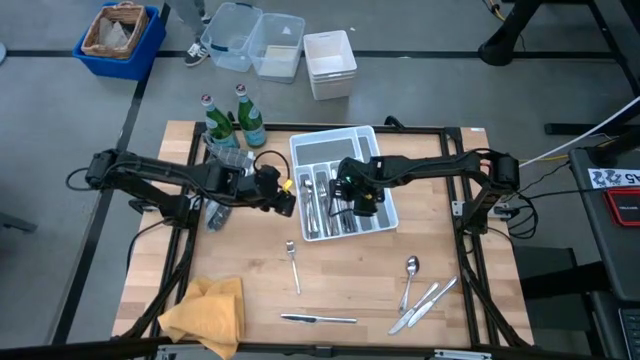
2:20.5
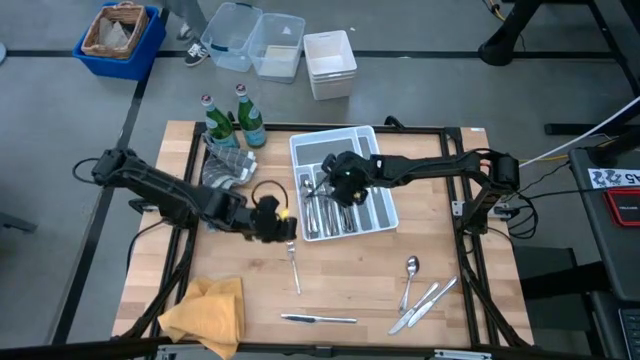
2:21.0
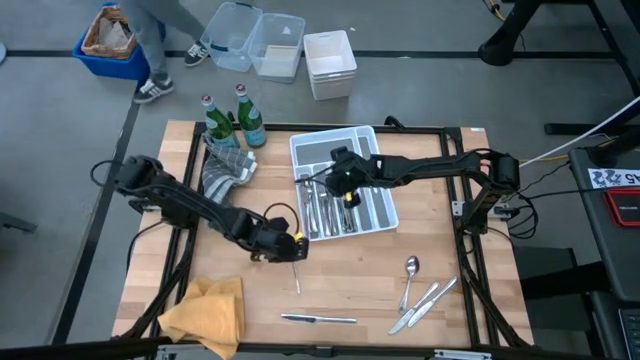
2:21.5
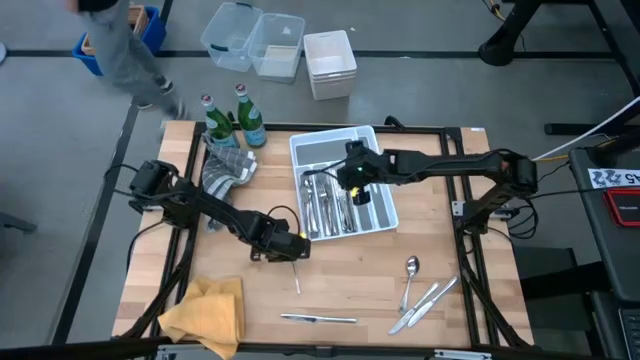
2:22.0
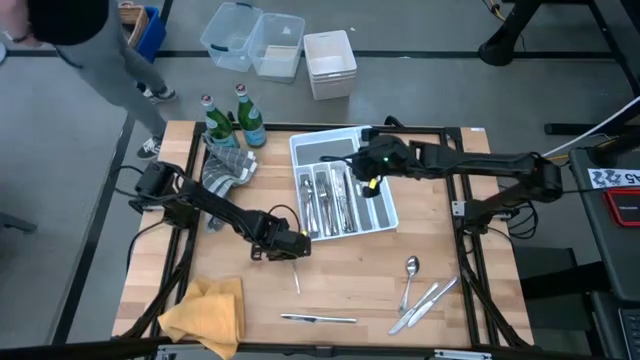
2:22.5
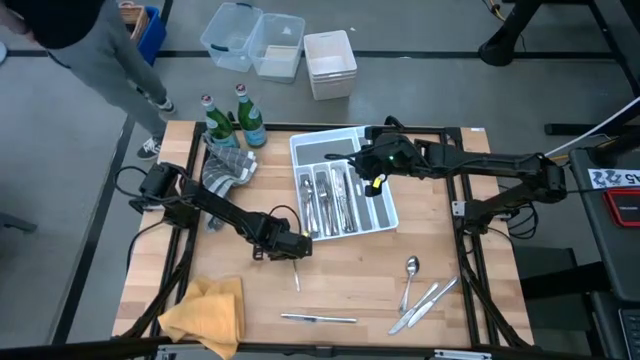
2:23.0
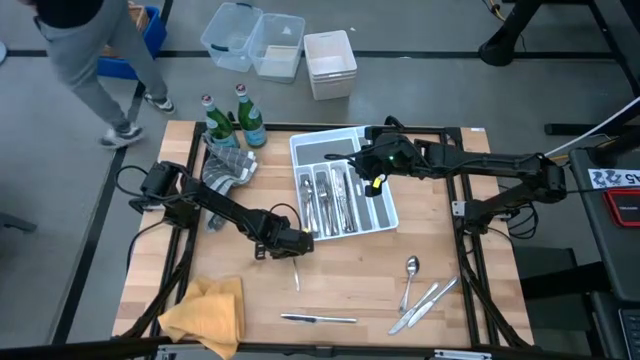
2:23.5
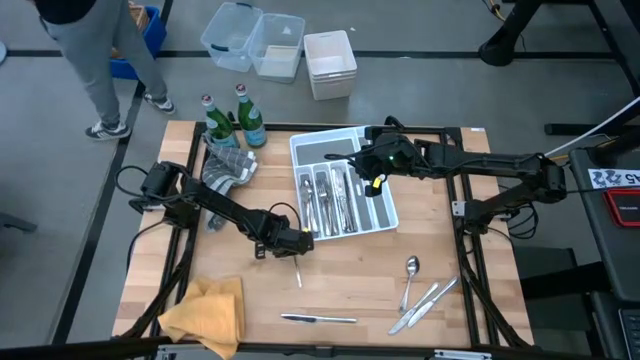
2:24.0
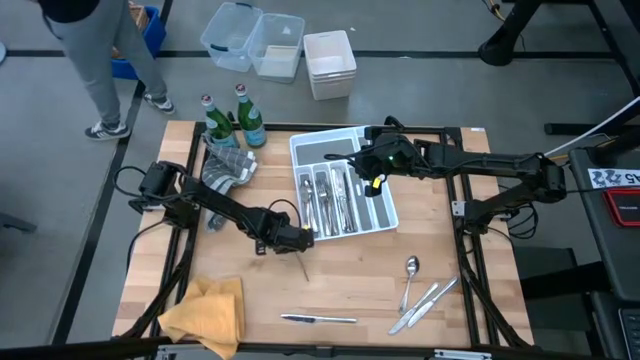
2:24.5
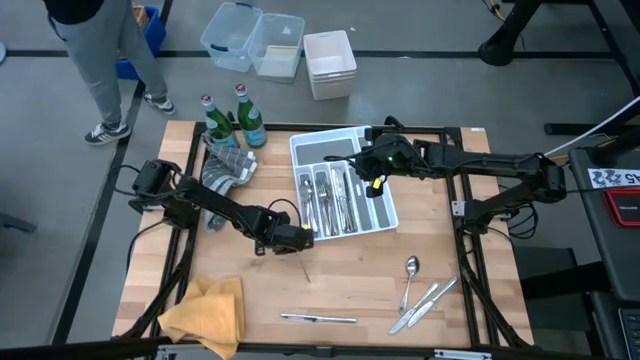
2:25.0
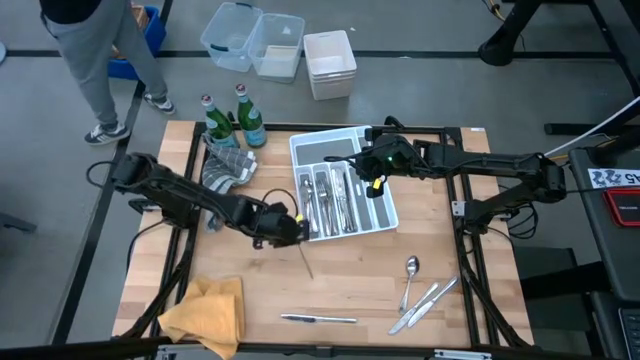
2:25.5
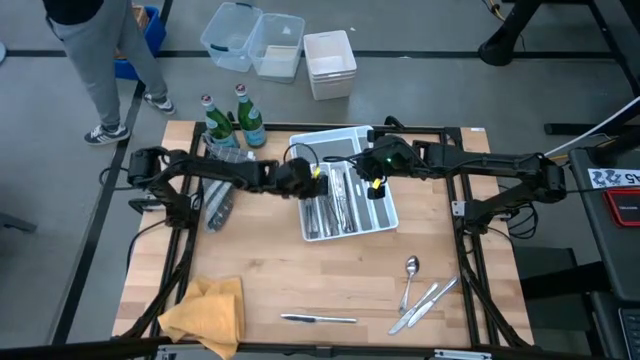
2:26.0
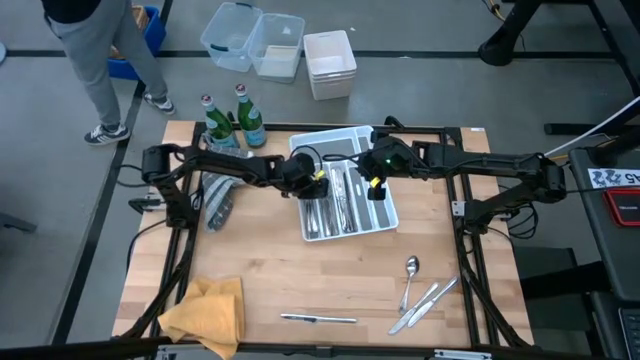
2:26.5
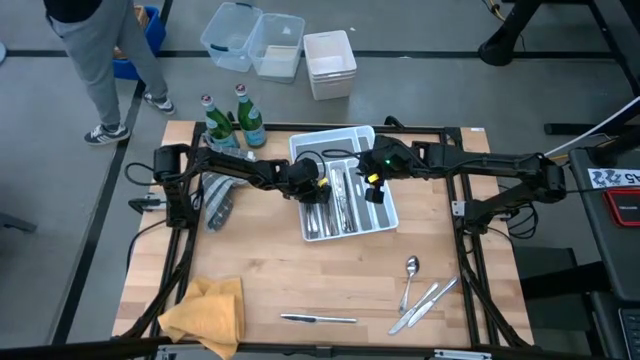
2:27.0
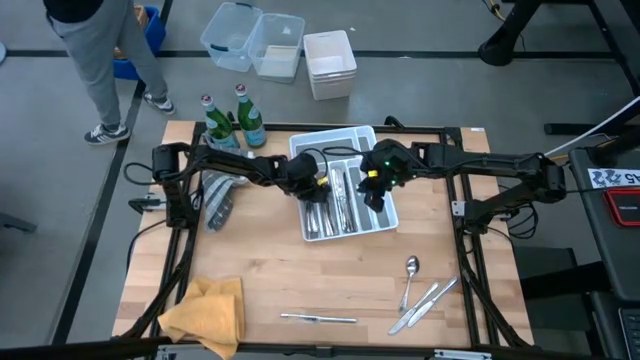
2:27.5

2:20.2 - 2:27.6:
Task: Sort silverware
Put the silver fork into the silverware tray

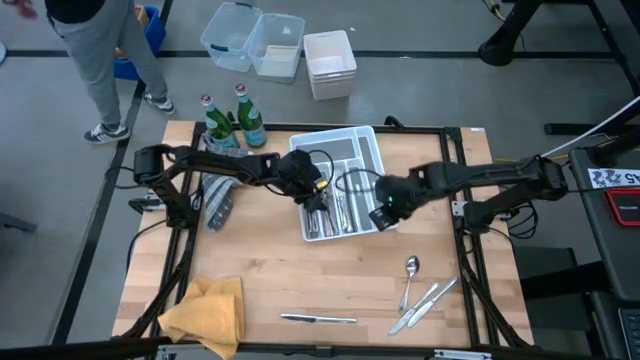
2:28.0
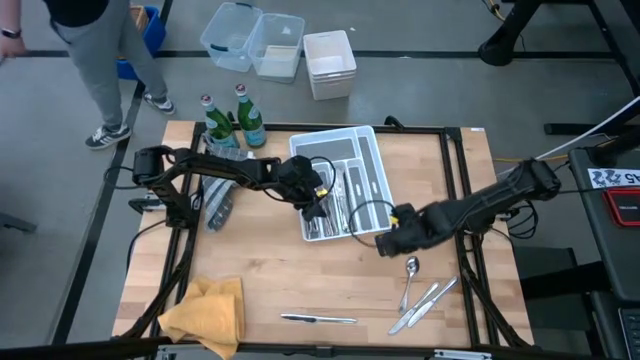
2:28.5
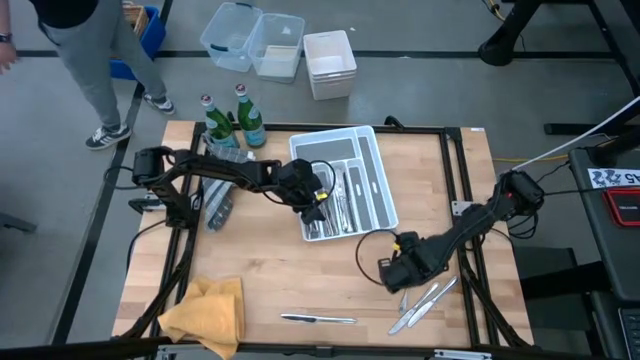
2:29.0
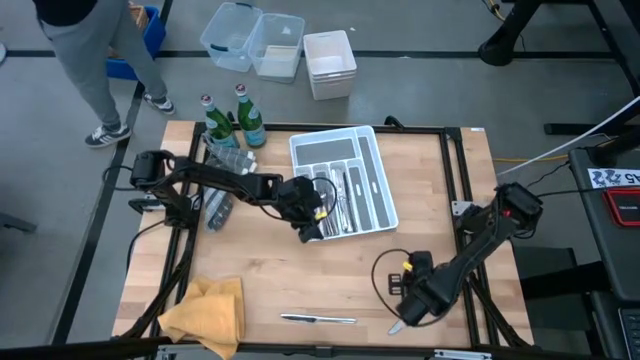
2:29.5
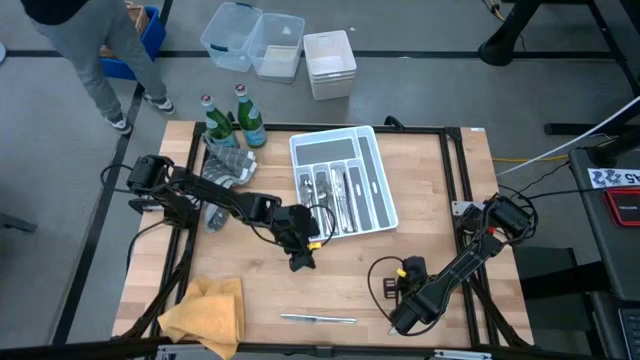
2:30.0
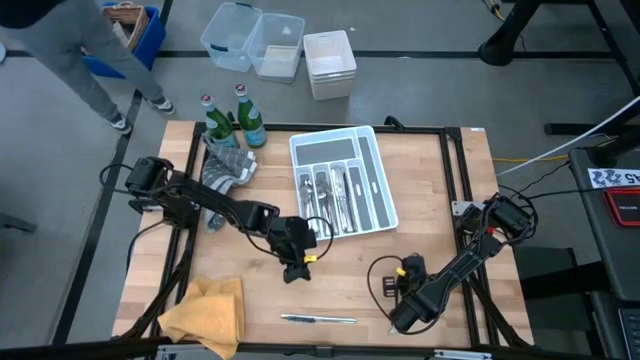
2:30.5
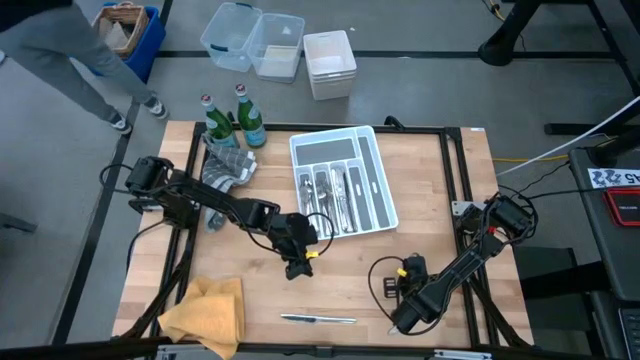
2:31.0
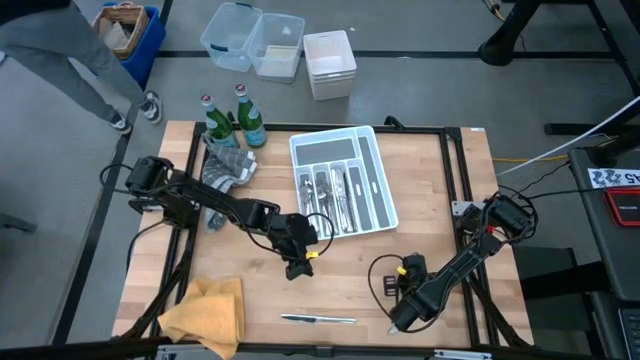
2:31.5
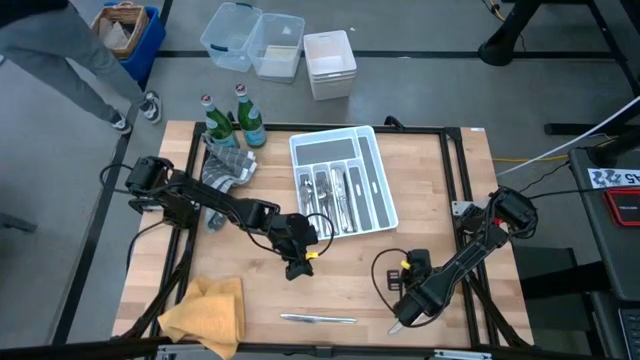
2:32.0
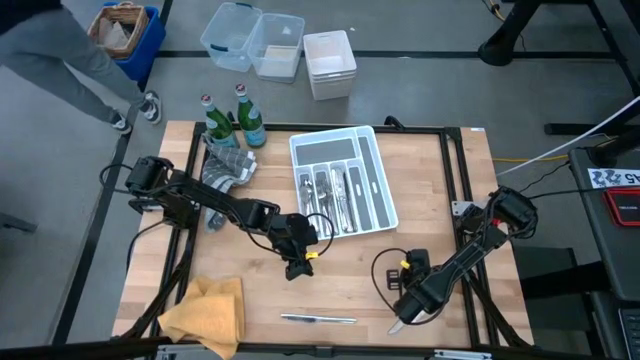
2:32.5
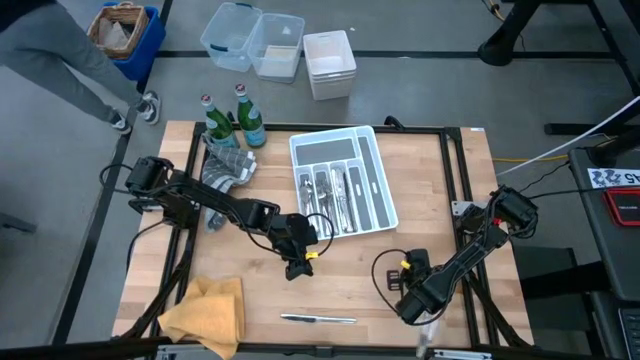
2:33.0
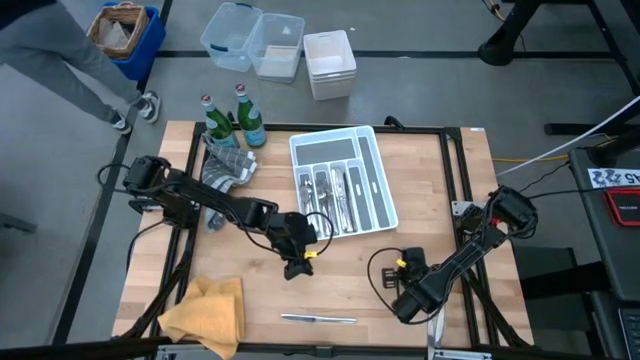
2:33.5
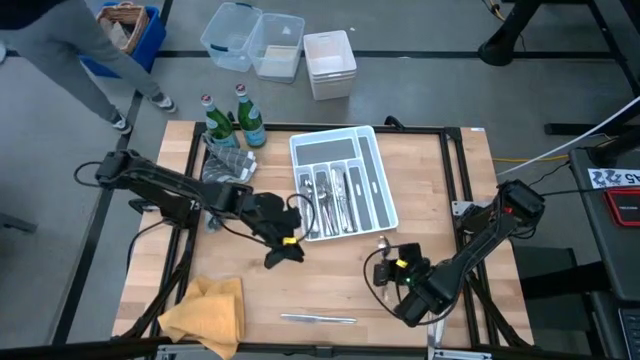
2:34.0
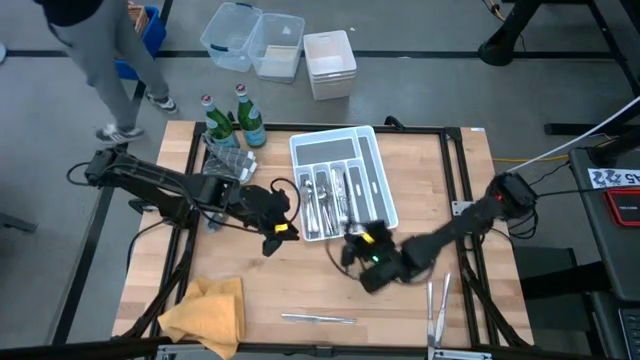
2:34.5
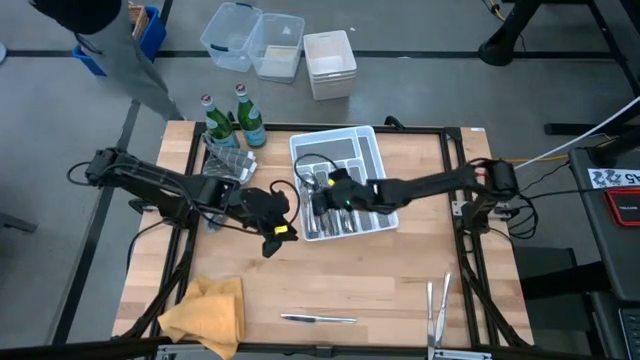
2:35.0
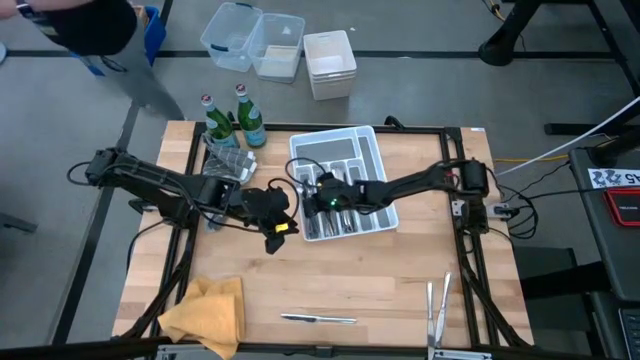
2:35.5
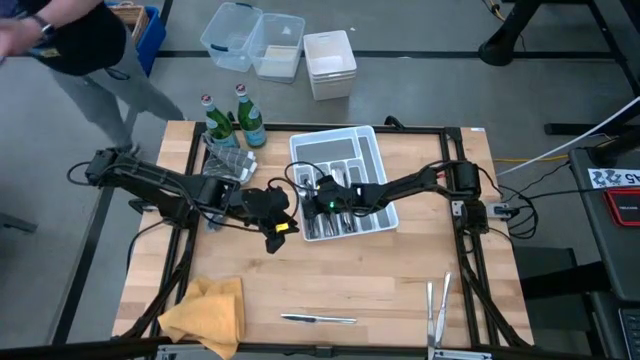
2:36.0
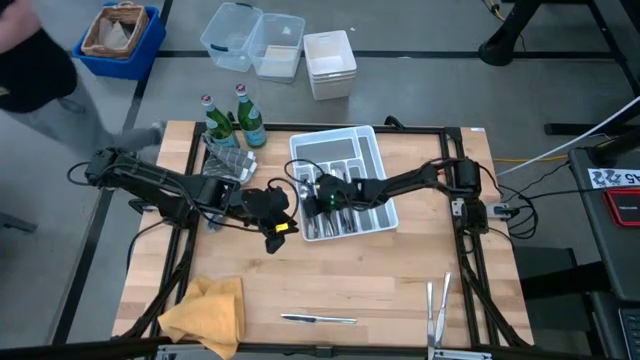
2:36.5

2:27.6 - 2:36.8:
Put the silver spoon into the silverware tray

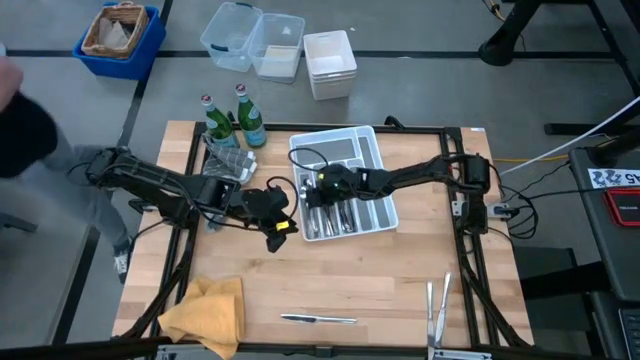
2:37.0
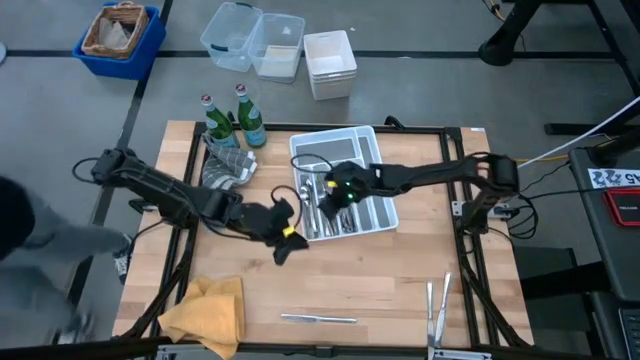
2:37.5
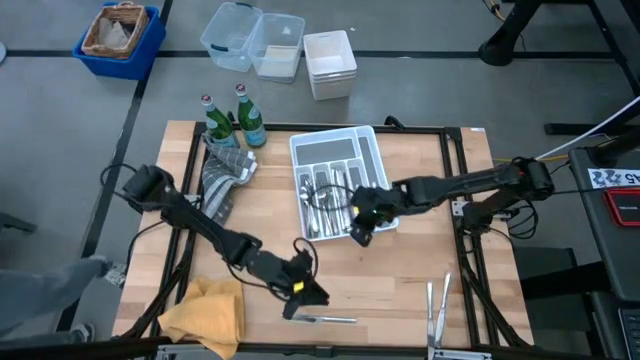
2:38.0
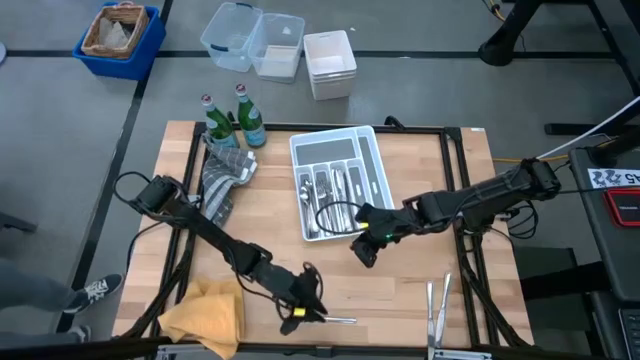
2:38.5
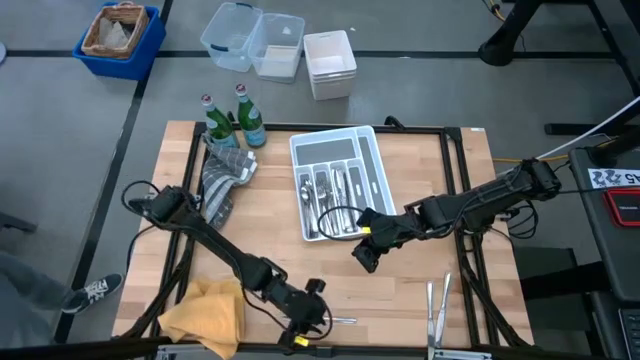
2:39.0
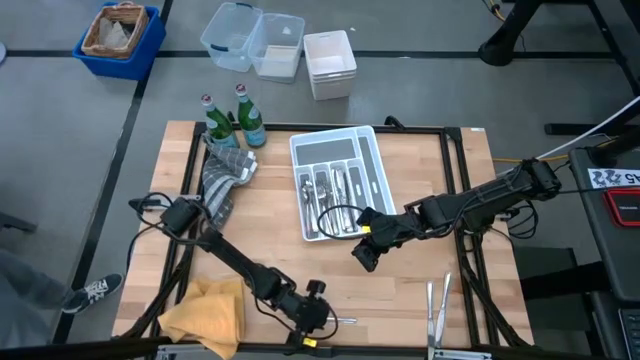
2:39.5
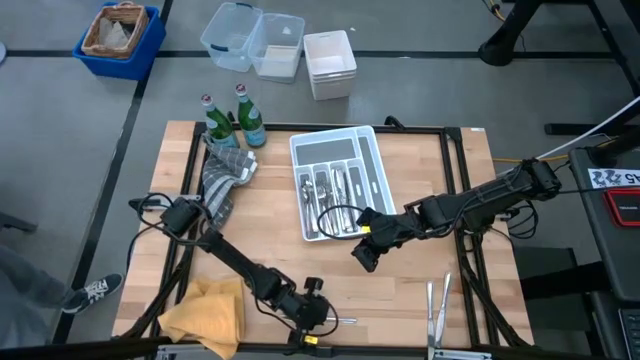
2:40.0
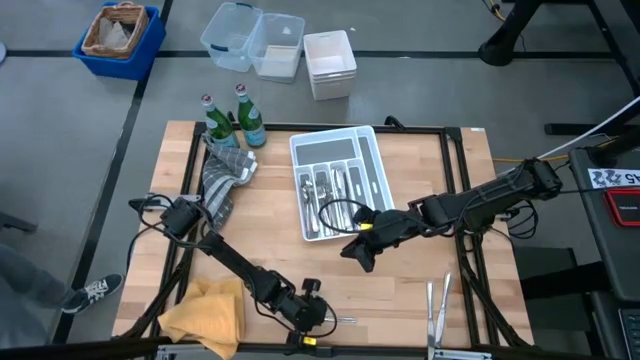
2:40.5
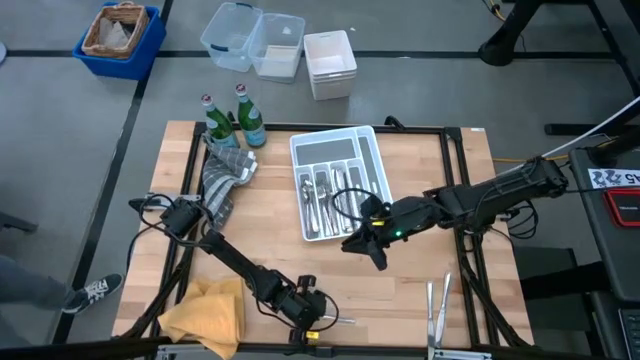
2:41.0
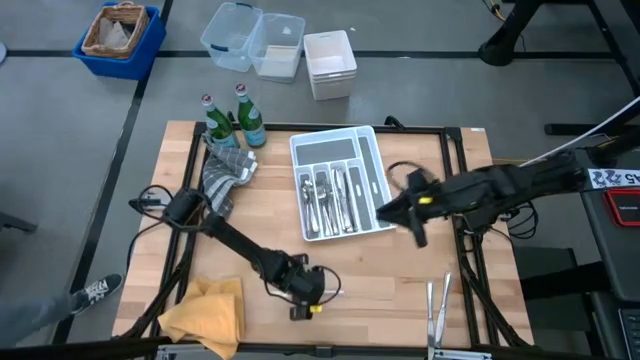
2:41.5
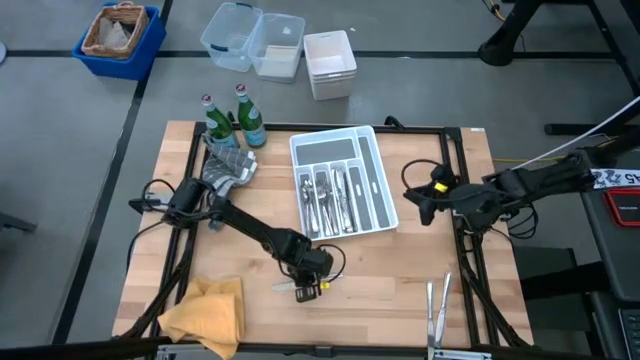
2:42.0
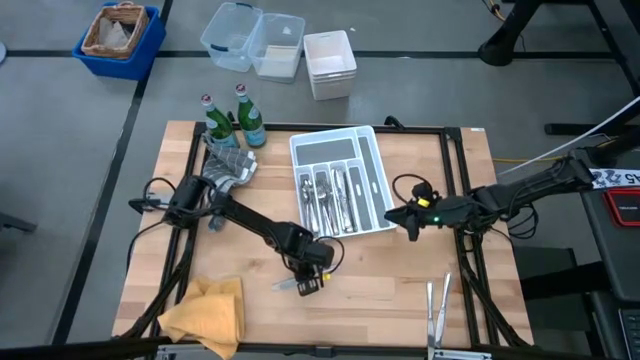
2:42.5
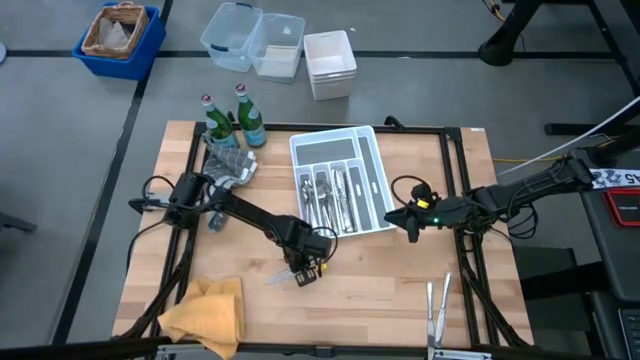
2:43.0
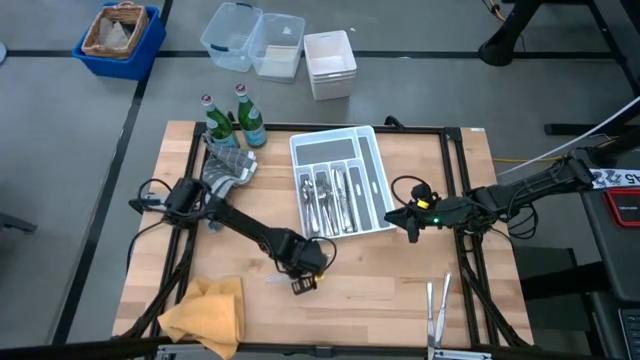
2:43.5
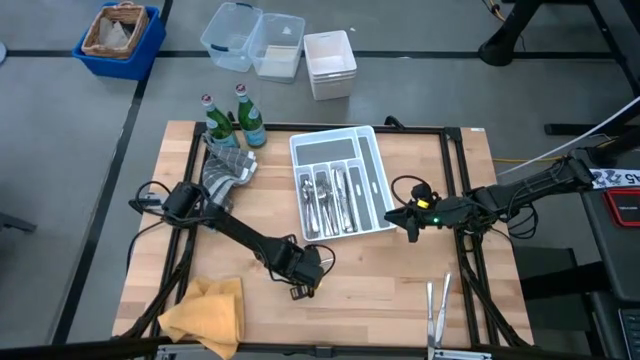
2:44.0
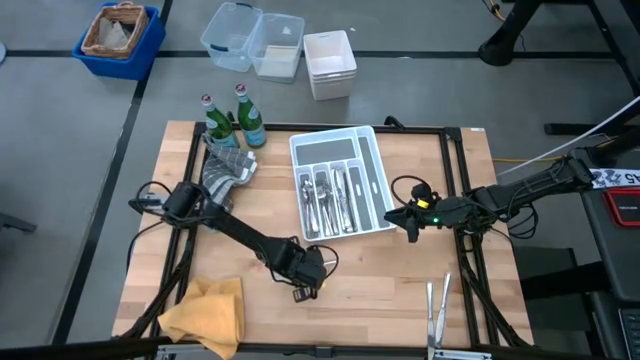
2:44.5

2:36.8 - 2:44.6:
Put the silver table knife into the silverware tray
